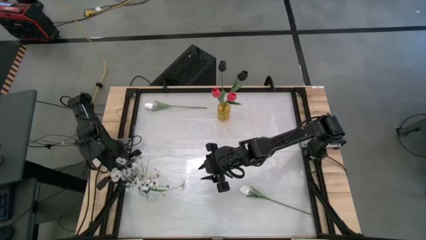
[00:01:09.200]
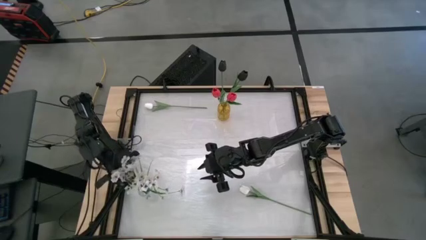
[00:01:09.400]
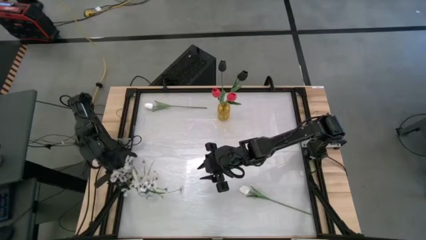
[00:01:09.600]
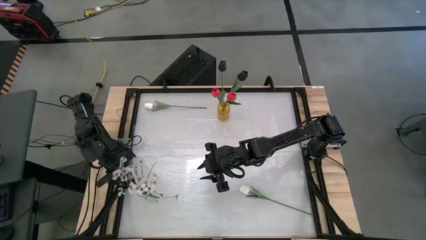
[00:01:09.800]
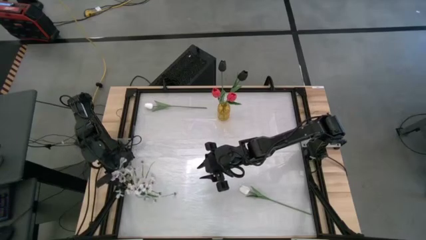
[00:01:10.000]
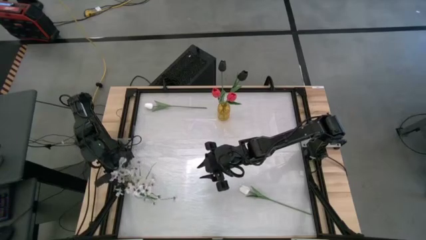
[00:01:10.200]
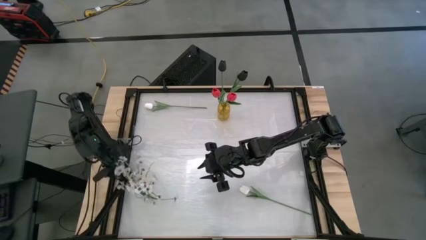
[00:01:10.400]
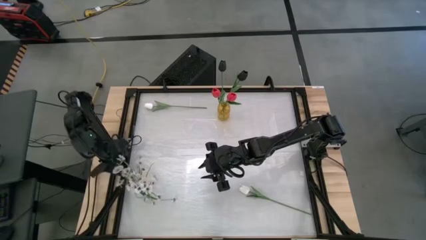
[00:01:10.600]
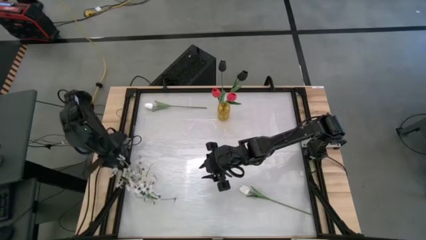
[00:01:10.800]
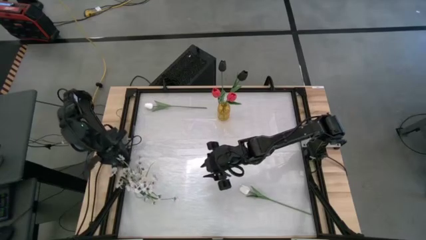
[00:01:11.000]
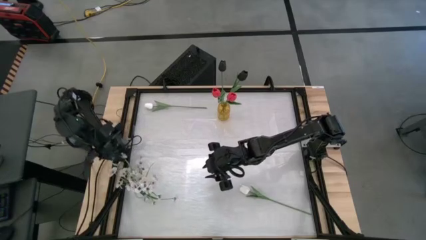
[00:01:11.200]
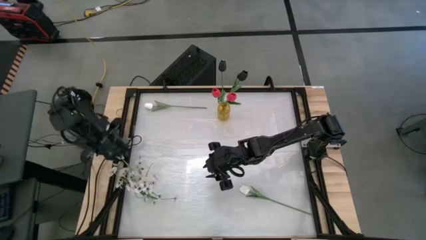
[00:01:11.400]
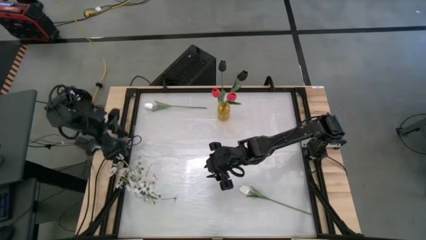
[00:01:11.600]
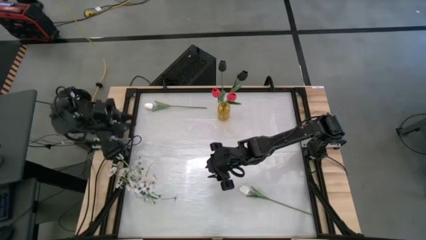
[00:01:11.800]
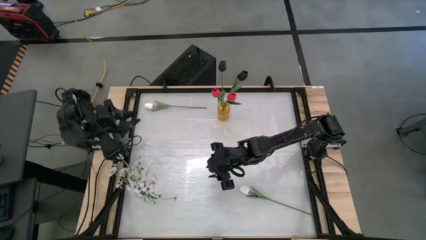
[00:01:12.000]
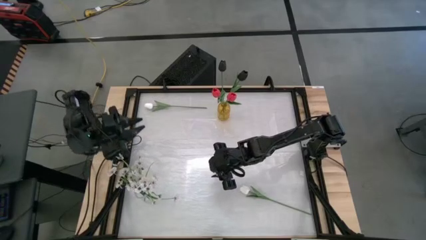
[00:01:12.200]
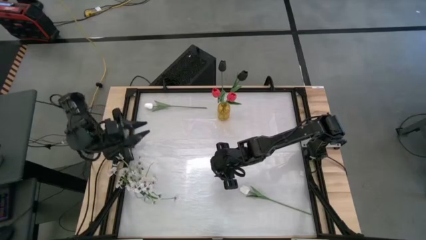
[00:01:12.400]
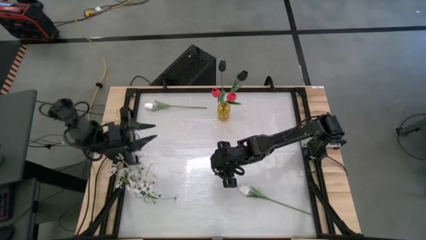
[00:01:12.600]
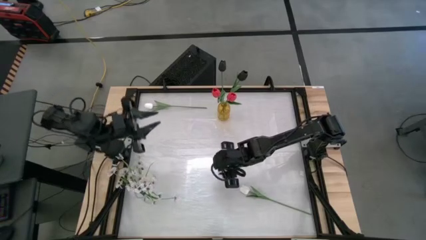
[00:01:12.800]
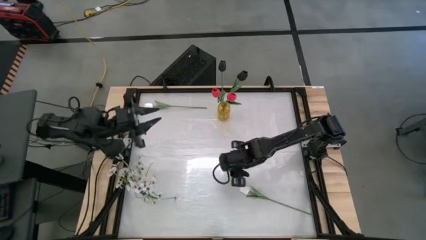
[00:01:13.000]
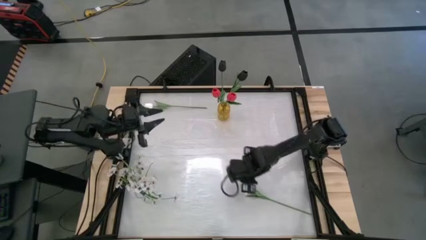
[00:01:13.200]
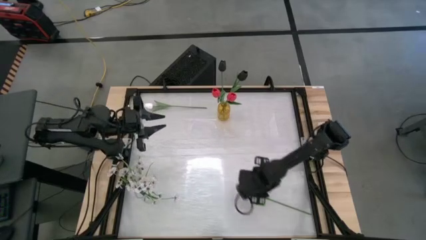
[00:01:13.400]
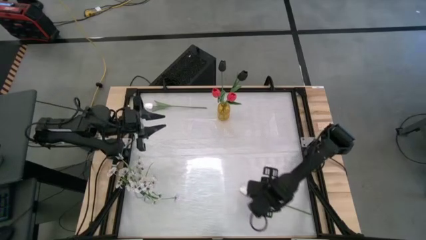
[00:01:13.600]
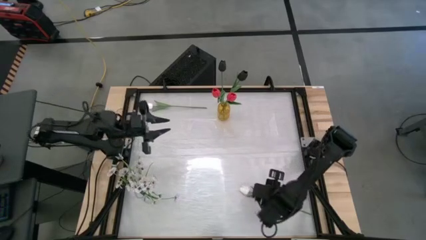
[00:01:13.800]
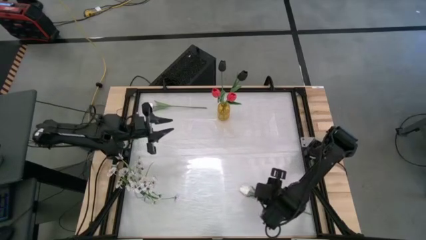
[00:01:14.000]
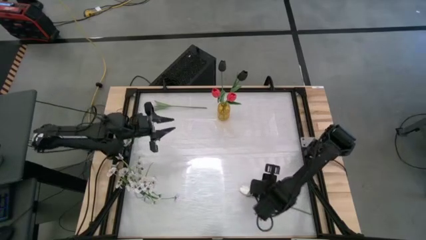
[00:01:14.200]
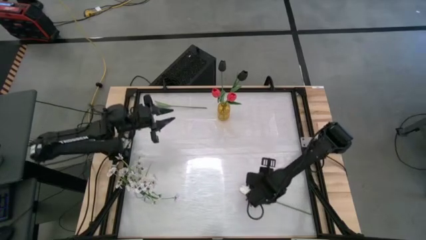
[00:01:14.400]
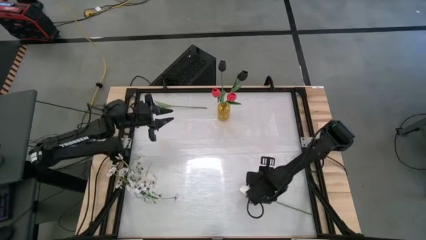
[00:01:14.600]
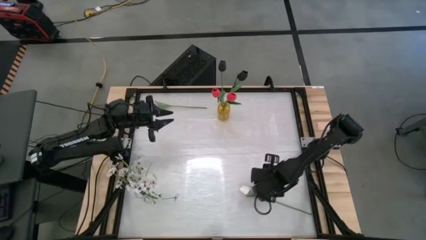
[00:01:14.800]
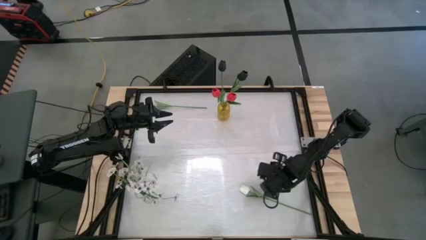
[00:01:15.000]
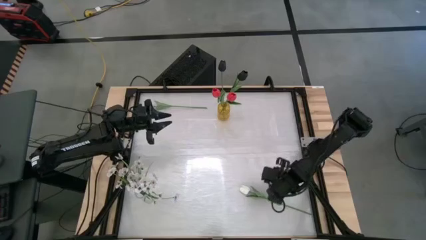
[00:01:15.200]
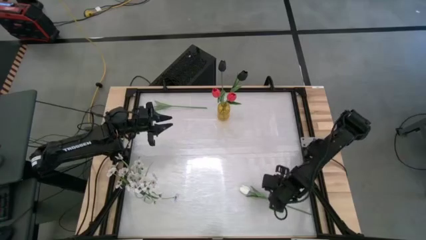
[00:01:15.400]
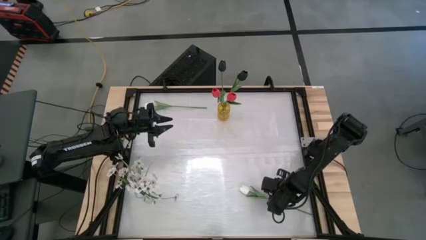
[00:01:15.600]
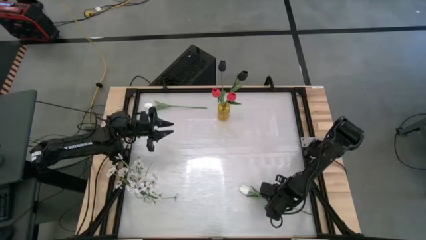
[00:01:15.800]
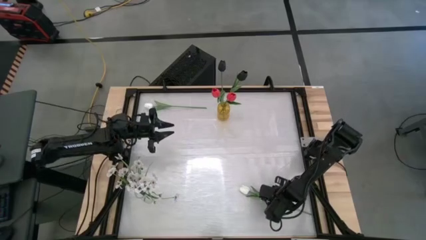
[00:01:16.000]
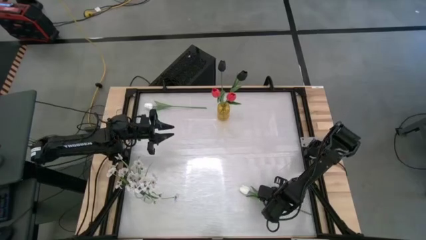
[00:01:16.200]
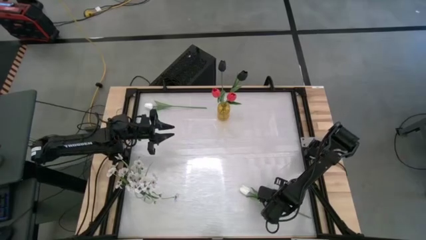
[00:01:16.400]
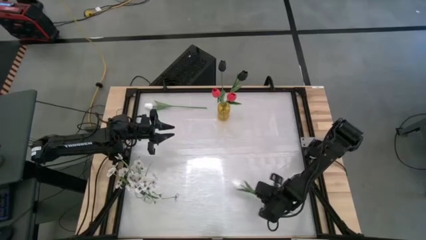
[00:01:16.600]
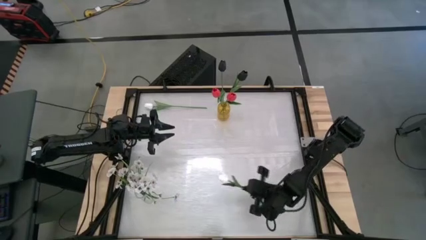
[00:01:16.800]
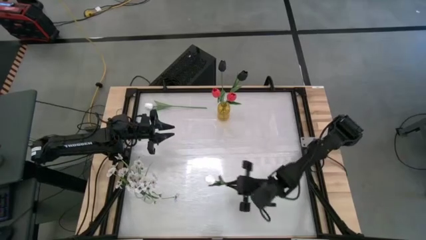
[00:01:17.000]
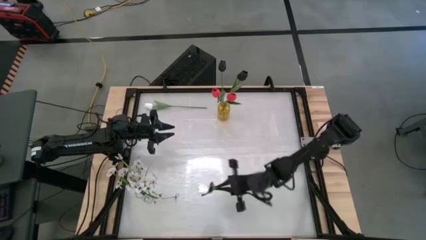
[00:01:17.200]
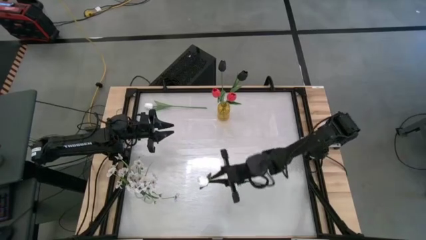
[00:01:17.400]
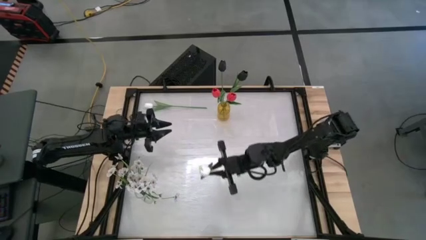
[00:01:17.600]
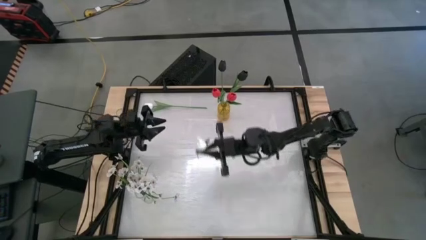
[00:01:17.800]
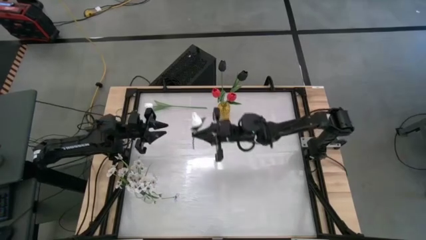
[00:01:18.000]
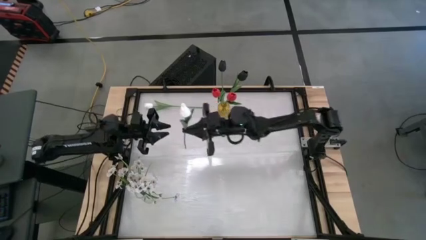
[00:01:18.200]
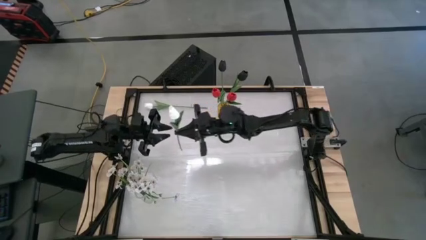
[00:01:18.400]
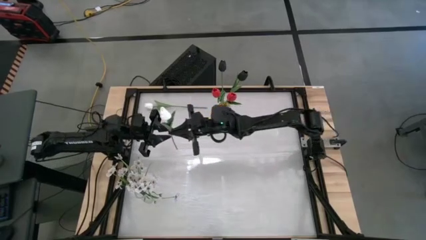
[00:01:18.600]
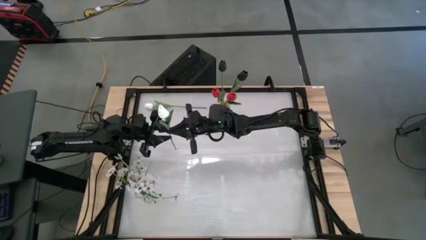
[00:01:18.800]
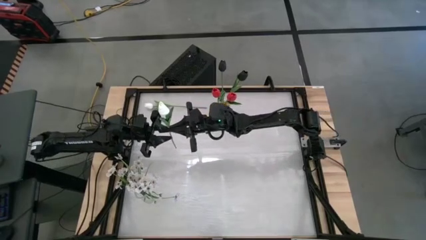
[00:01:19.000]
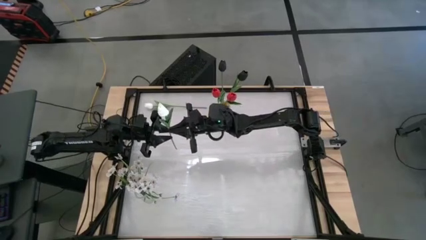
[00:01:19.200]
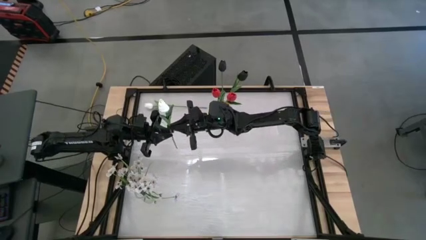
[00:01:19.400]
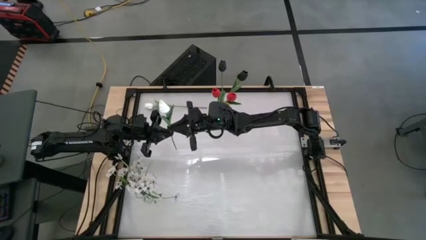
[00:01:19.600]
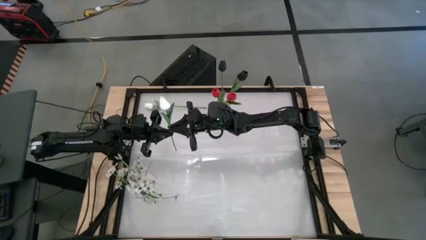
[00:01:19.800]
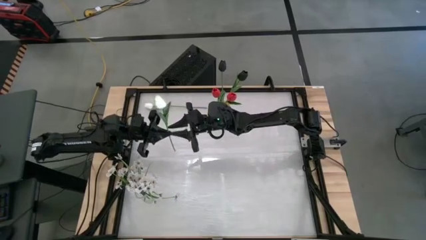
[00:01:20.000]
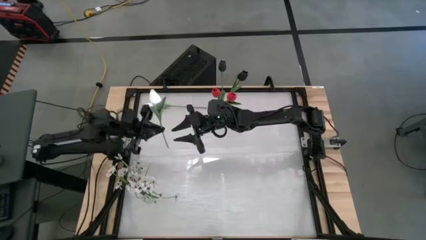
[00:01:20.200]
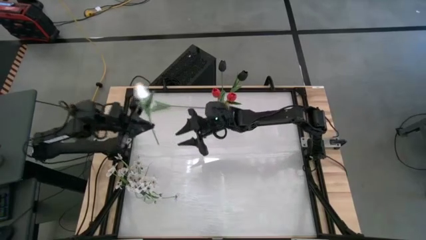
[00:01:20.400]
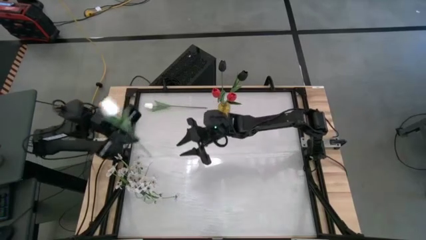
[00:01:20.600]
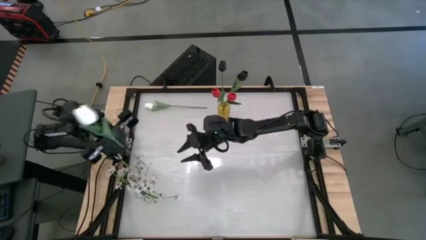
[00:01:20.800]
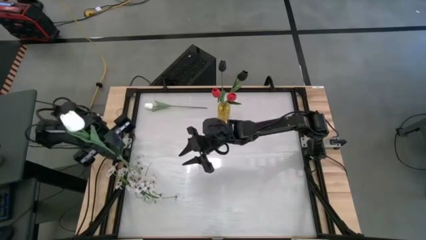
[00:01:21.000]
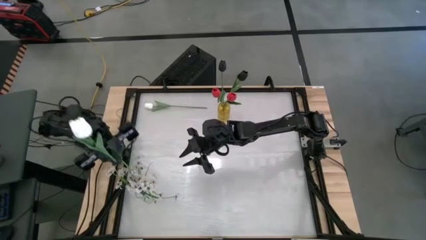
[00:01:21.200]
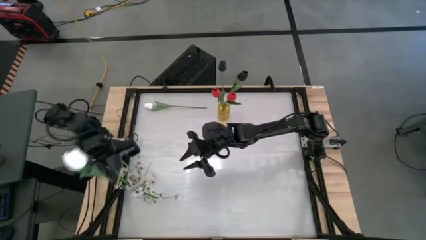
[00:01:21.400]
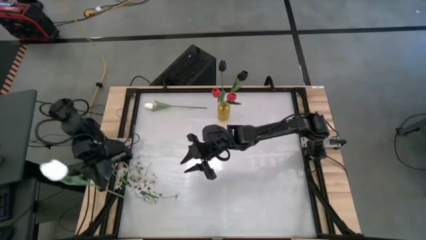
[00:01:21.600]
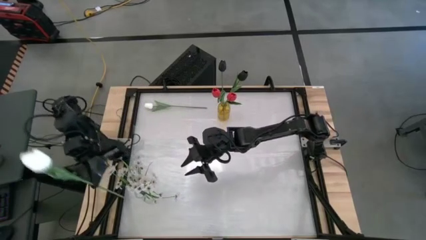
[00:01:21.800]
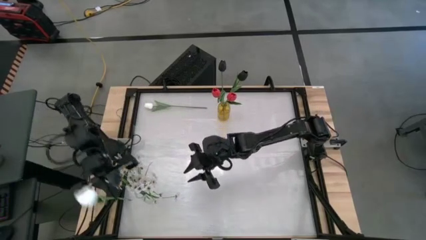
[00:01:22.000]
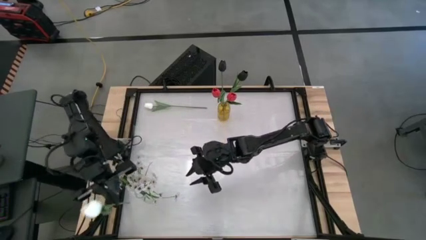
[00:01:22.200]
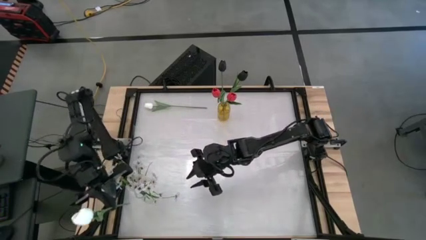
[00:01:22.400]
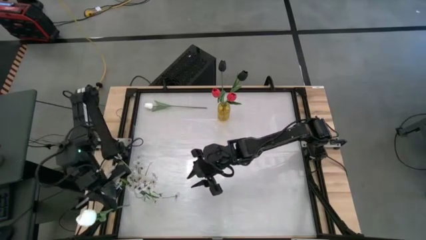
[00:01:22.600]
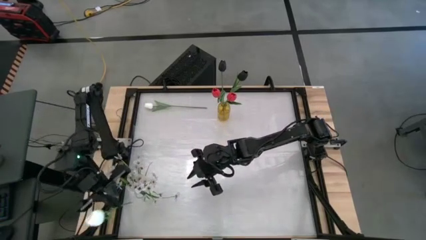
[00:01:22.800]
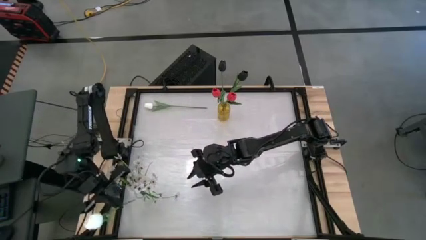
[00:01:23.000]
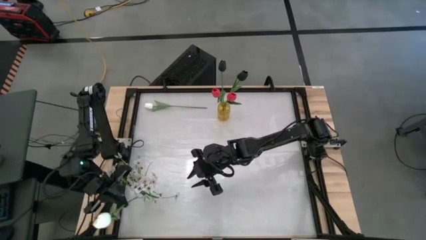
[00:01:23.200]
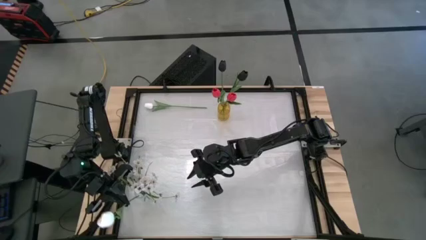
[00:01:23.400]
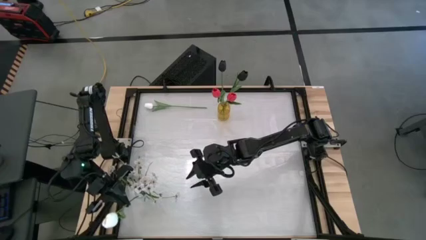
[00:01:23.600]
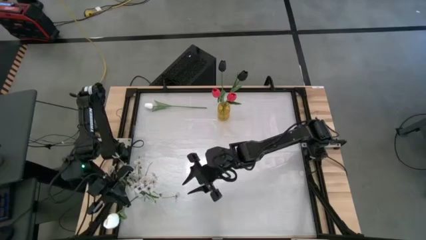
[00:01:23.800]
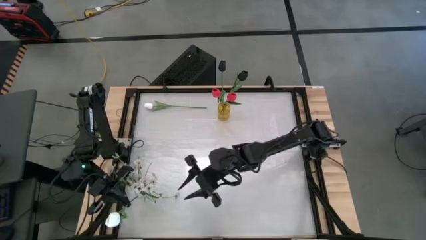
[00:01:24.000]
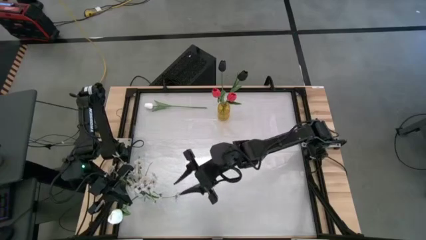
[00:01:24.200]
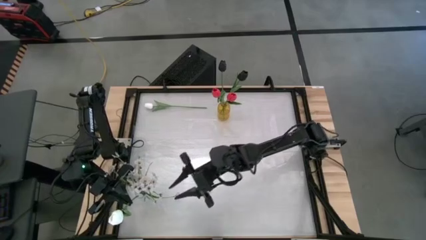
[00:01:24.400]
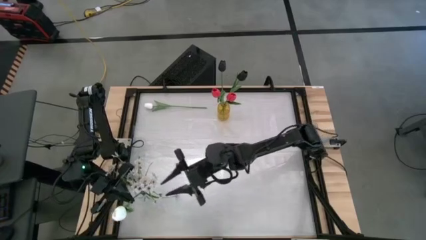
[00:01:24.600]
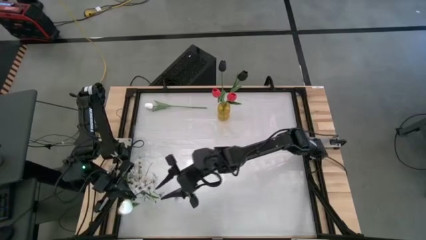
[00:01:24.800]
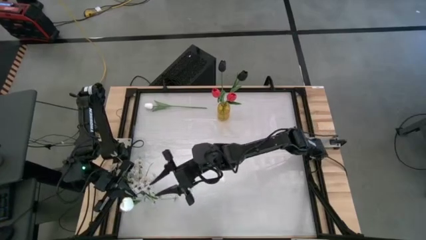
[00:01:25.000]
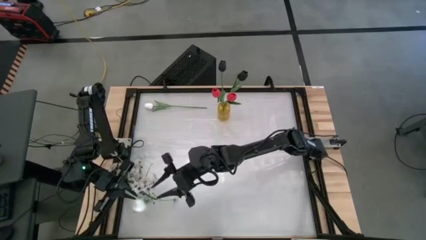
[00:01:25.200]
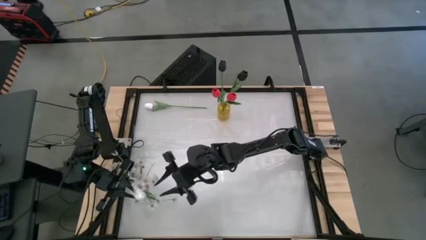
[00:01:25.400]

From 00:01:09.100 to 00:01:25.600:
Task: Sort flowers into vase by color
Put the bottom white tulip into the transparent vase
